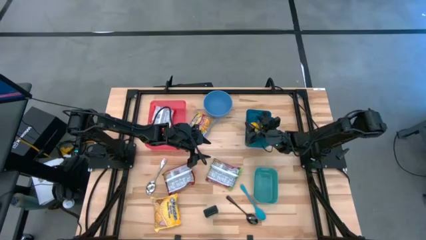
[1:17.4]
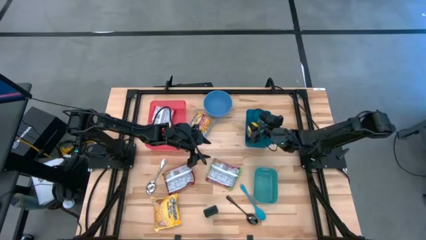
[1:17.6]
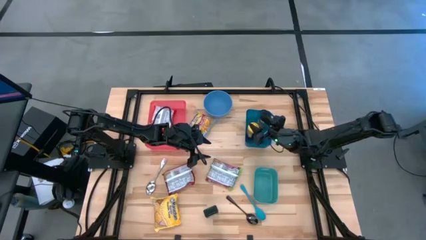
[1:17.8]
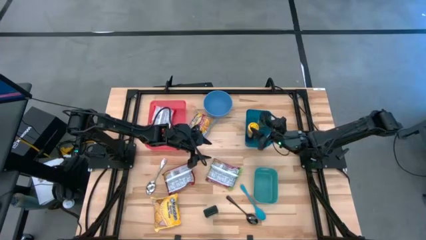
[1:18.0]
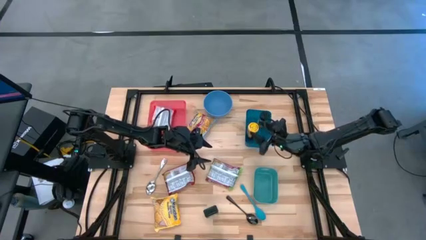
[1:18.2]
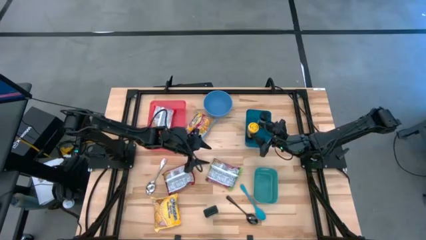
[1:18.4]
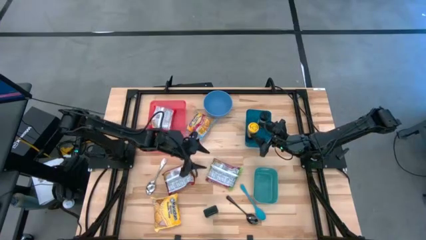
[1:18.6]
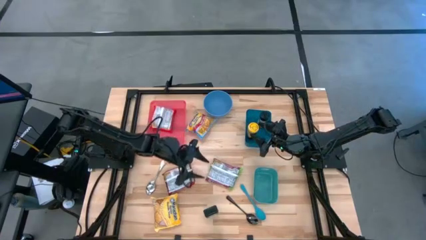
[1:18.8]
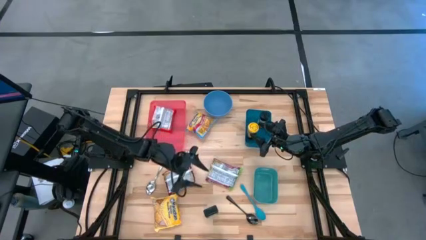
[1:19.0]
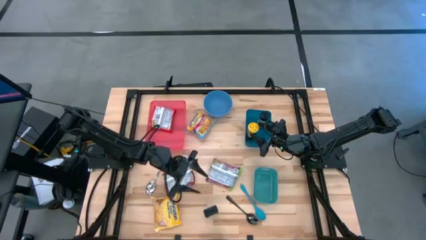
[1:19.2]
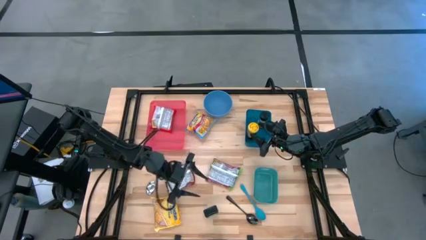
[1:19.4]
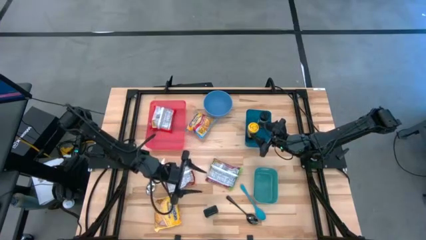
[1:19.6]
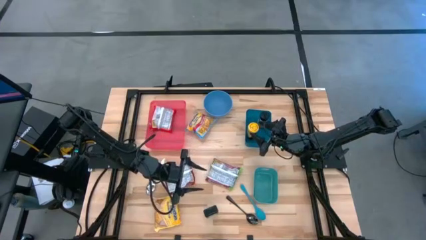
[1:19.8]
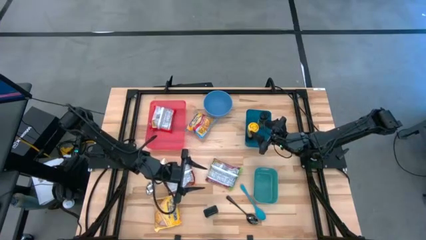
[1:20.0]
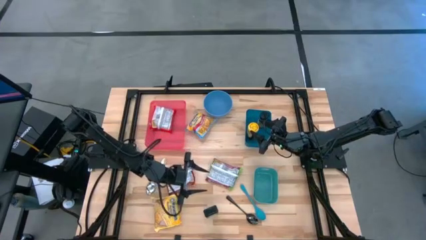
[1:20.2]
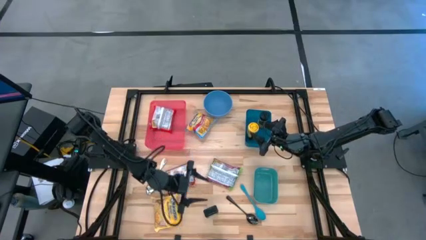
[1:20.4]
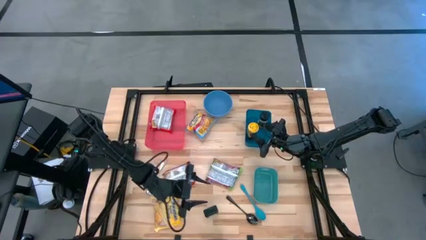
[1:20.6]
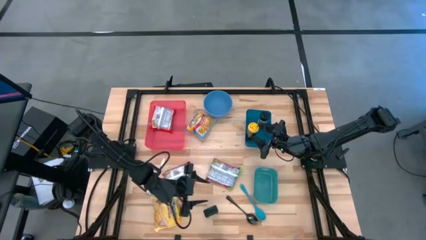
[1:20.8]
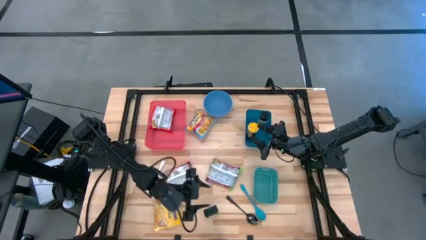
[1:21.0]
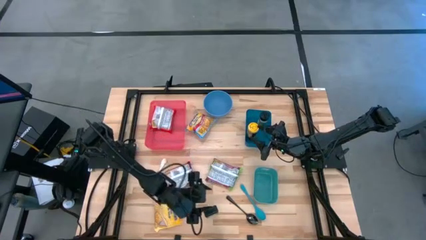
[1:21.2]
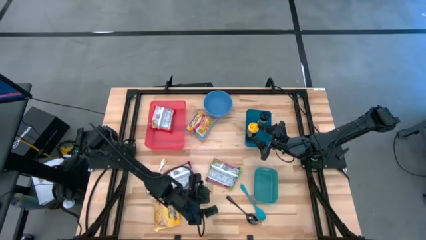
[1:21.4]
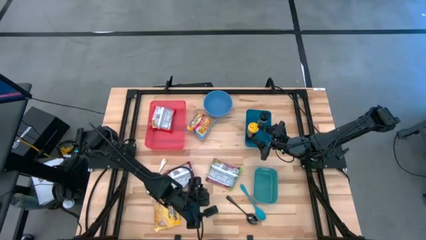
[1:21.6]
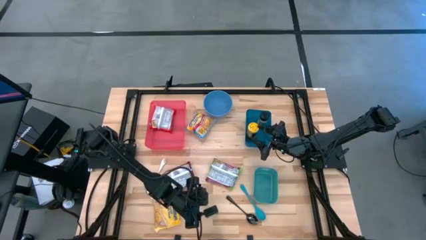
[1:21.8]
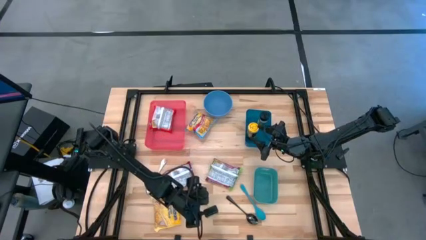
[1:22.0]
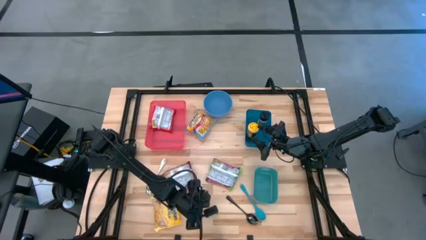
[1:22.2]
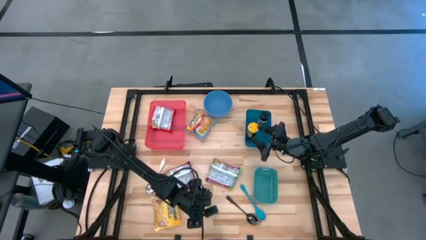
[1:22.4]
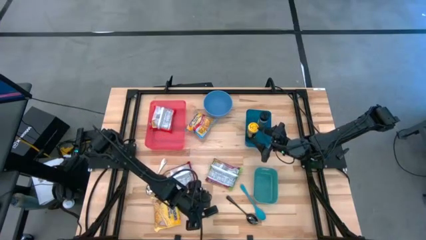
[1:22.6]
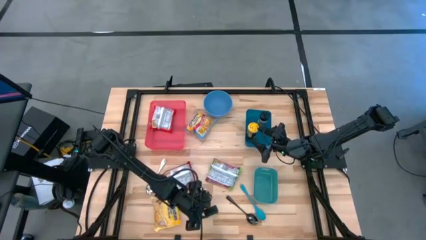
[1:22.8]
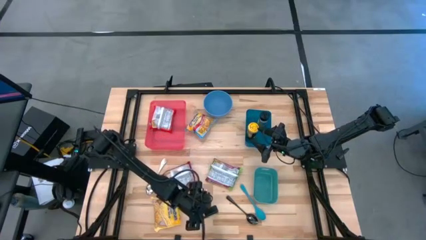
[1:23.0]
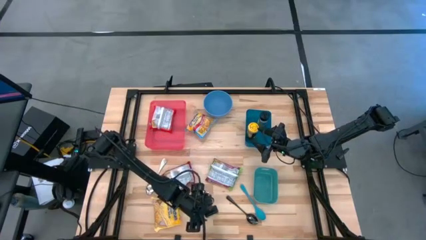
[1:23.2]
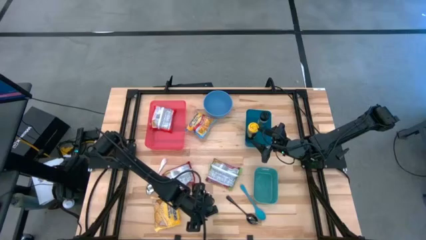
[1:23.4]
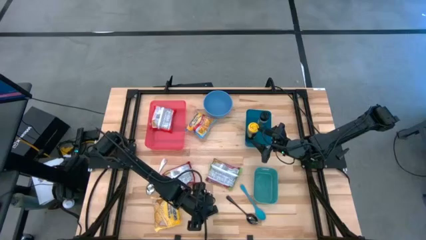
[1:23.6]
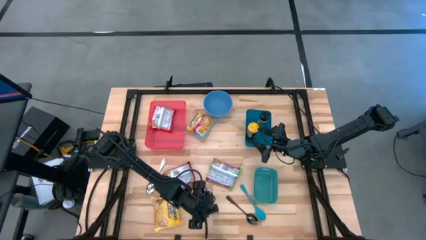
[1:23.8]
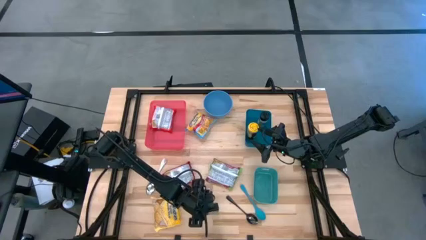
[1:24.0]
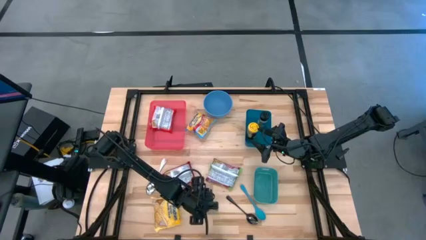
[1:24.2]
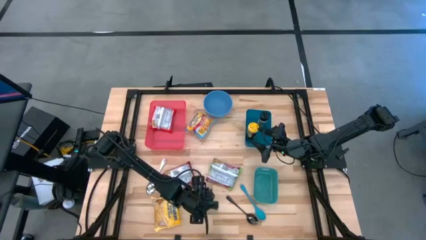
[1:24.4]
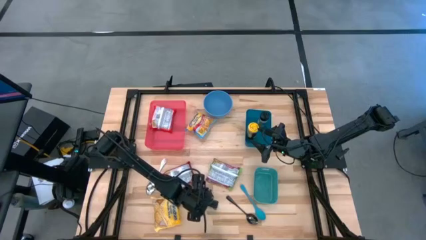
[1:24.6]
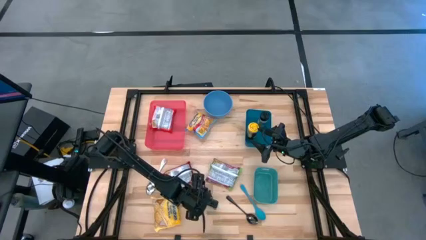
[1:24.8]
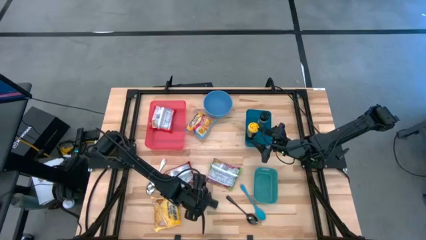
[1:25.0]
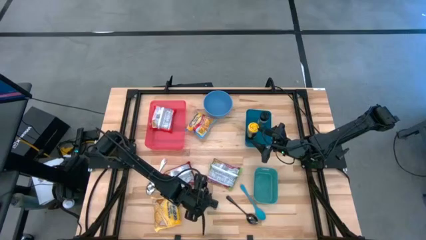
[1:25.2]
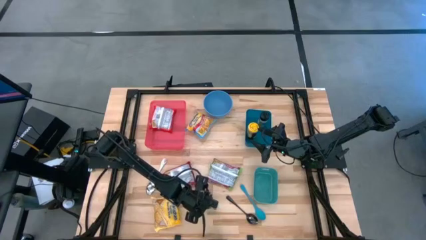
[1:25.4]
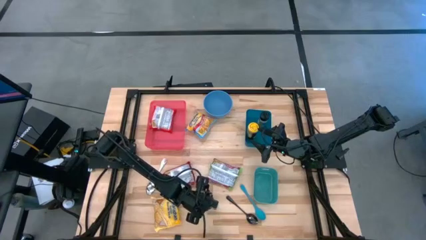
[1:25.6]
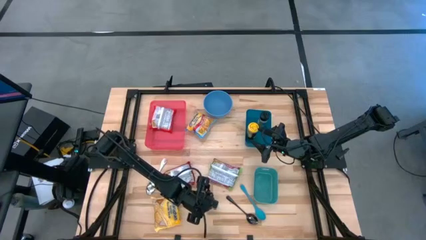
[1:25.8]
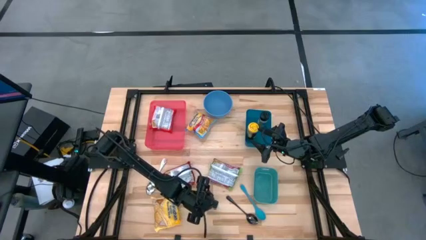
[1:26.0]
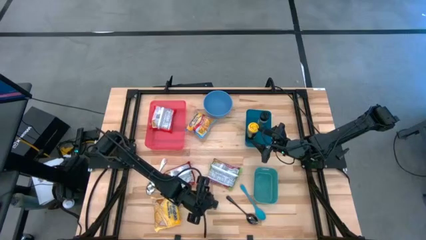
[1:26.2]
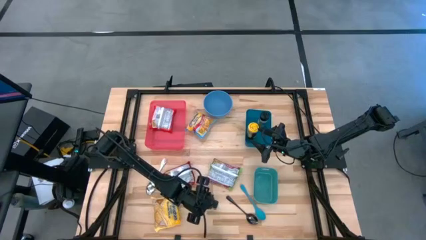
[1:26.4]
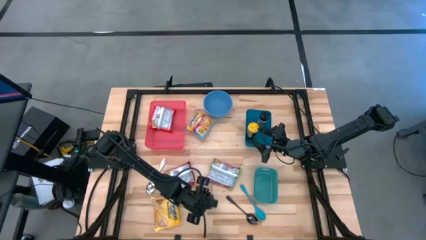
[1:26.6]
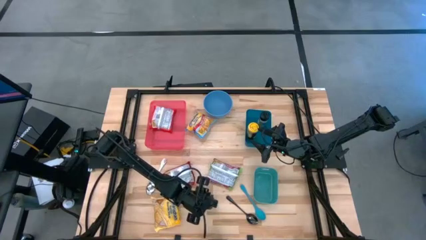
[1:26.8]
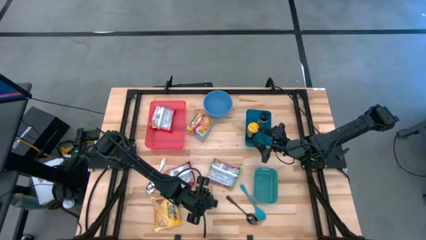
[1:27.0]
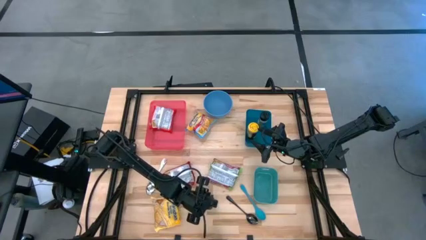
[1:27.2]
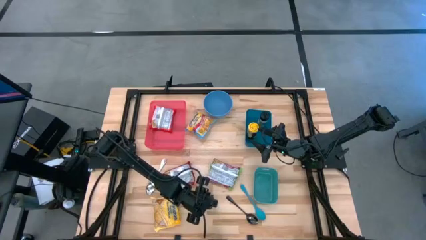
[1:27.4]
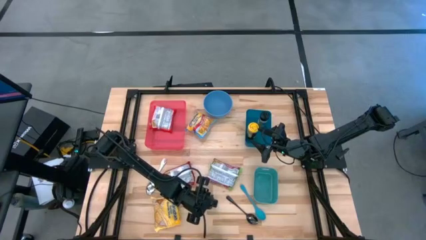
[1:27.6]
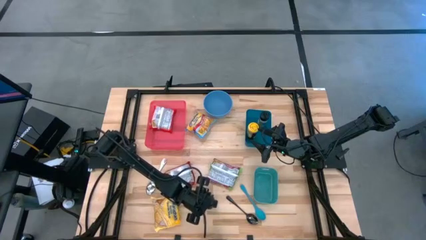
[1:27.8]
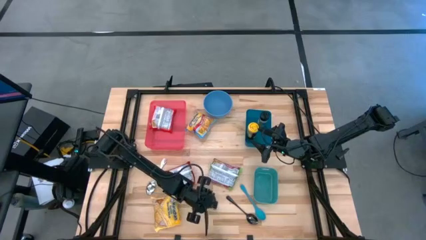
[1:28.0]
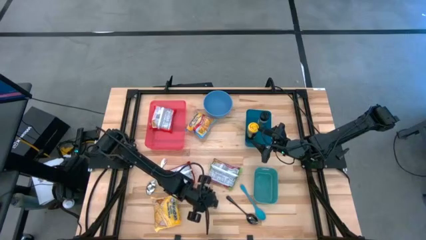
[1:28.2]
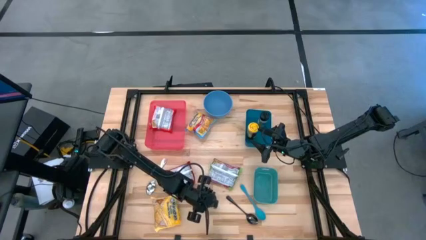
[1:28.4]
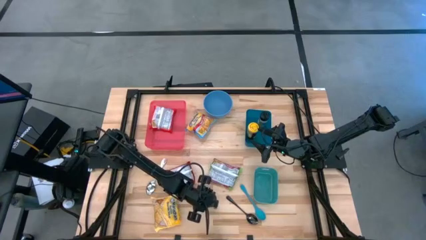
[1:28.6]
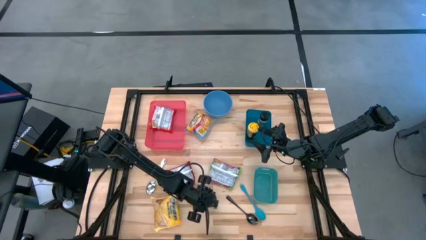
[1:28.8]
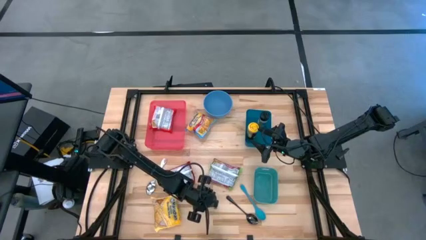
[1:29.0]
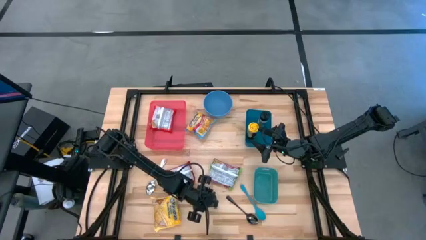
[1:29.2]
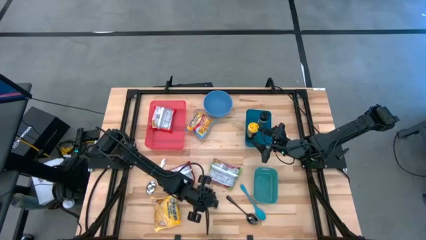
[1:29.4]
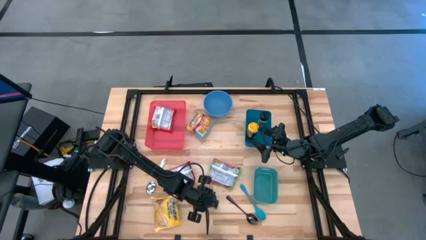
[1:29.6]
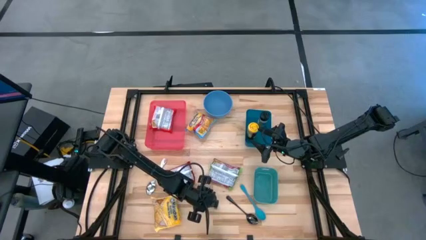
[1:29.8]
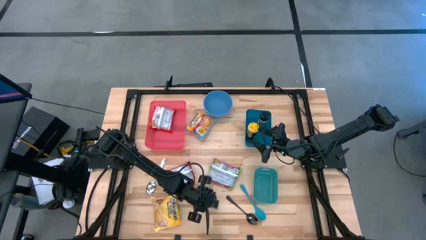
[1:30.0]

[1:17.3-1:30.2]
Task: Pick & Place Food Item
Put the black seasoning can into the blue bin

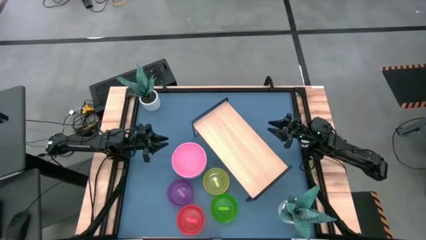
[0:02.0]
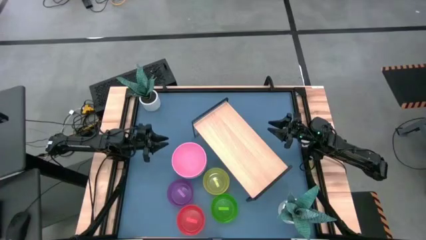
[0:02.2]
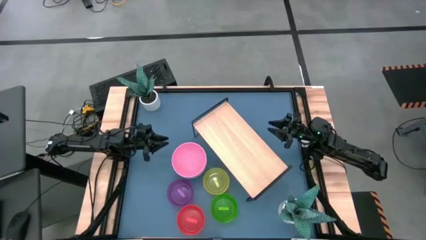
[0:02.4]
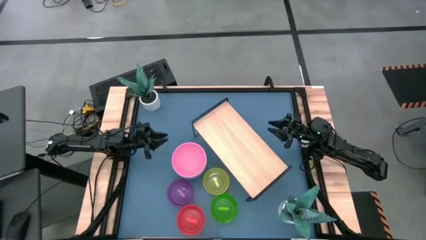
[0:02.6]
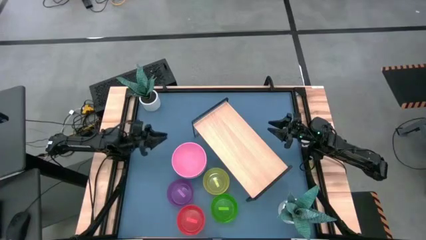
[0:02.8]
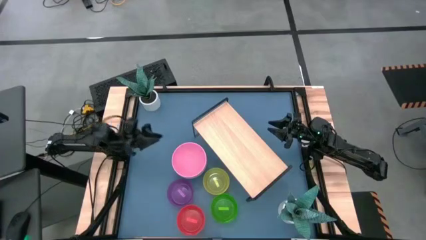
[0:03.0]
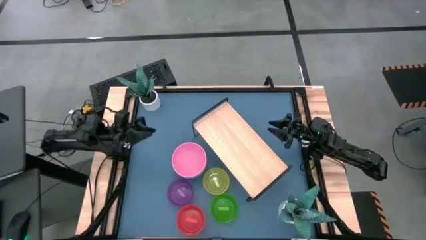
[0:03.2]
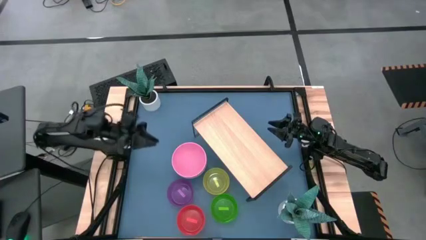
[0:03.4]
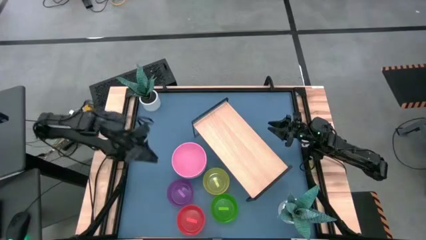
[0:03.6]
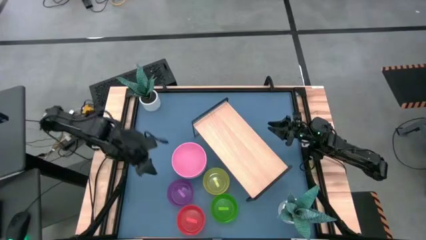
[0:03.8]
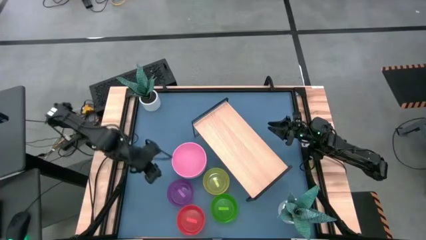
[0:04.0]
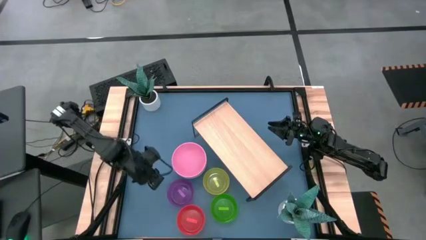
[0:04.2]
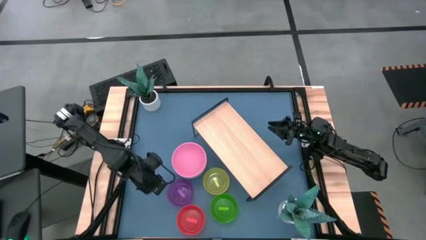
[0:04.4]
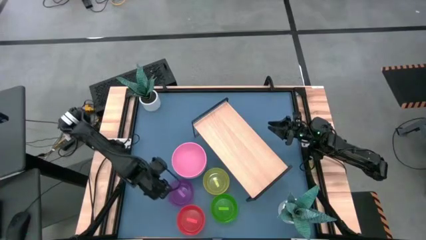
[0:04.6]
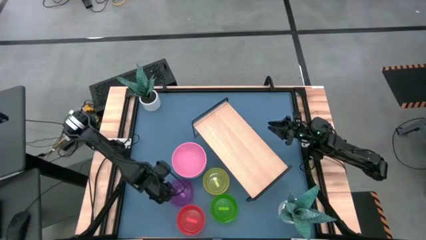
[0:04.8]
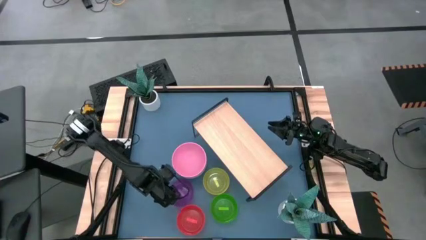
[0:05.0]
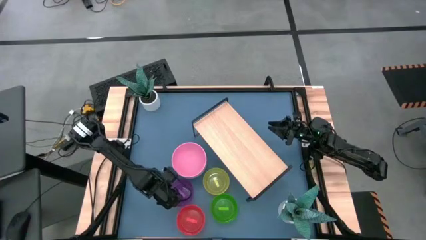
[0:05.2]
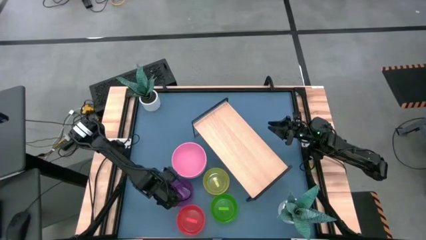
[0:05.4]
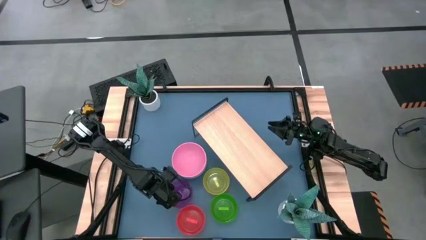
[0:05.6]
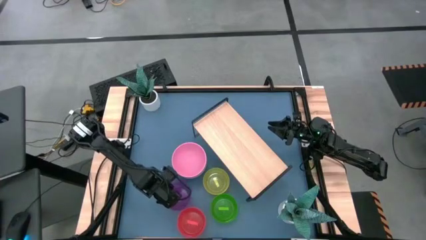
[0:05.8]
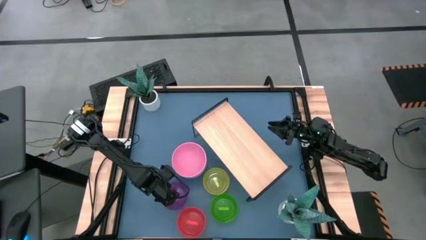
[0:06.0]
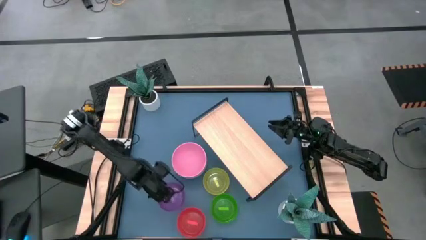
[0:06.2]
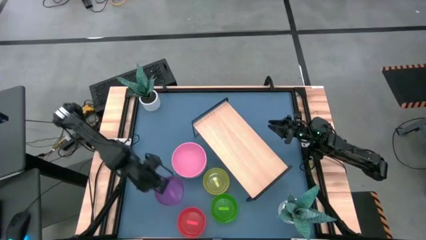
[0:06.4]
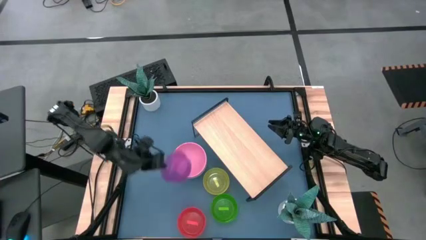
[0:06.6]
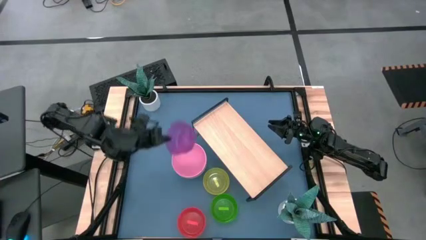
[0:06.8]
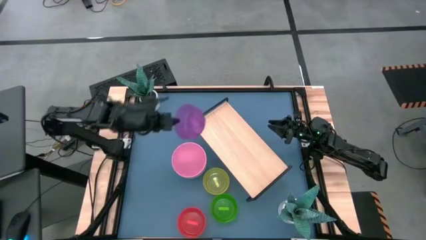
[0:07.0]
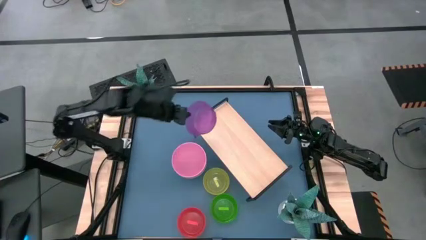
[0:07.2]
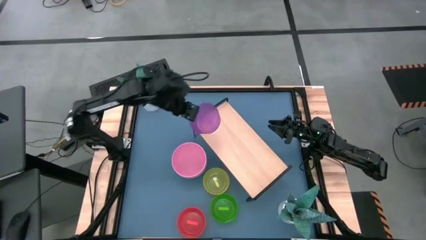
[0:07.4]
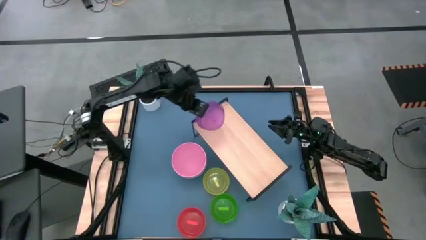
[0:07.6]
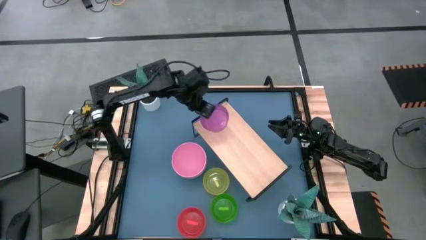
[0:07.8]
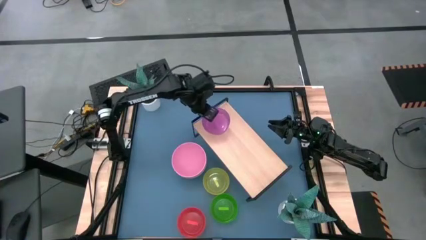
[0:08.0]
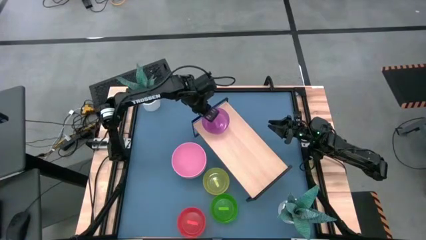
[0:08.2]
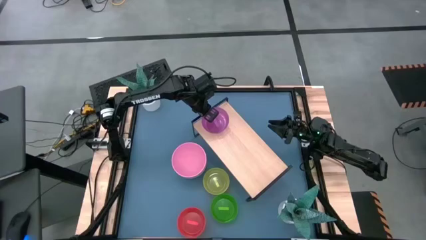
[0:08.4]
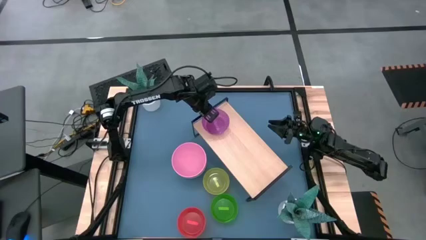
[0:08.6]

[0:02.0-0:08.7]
Task: Place and stack bowls onto a shelf
Put the purple bowl on the shelf
